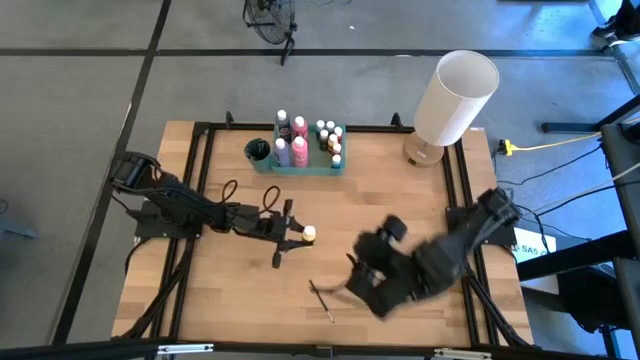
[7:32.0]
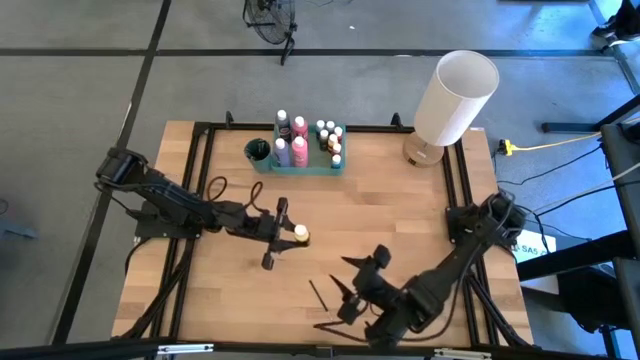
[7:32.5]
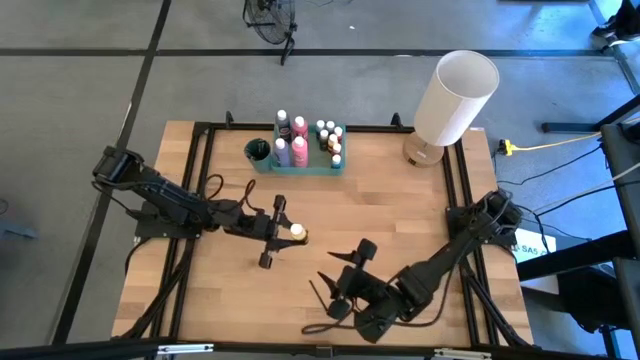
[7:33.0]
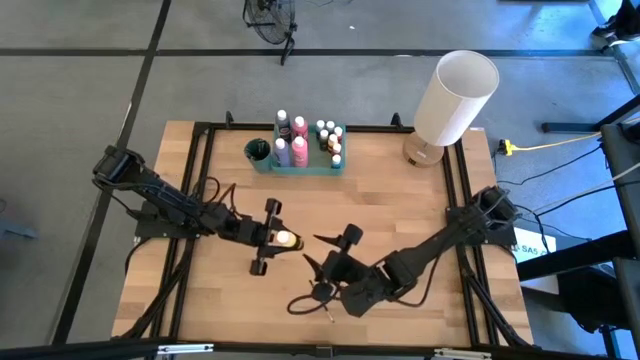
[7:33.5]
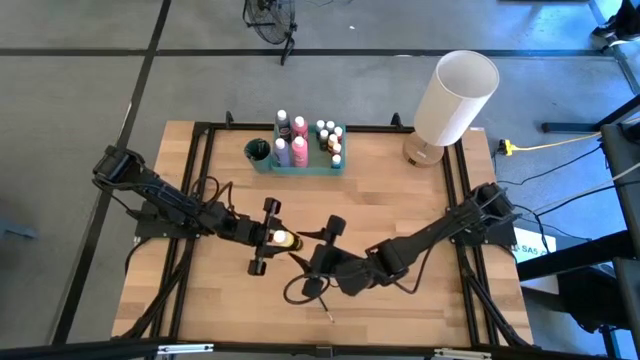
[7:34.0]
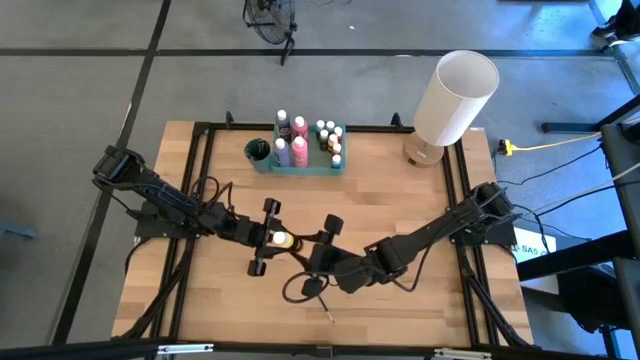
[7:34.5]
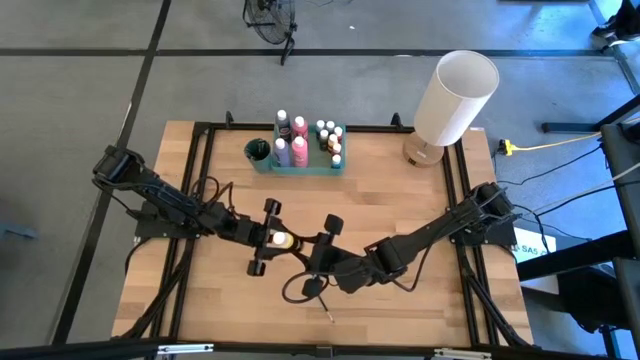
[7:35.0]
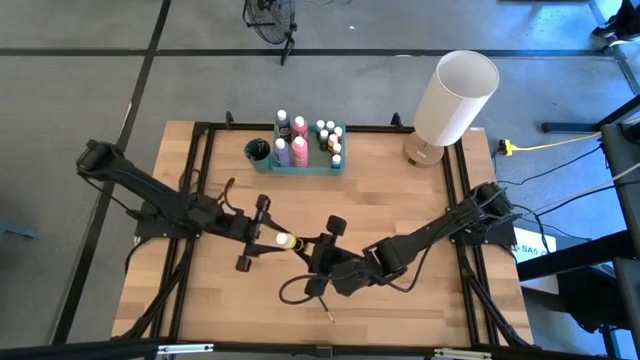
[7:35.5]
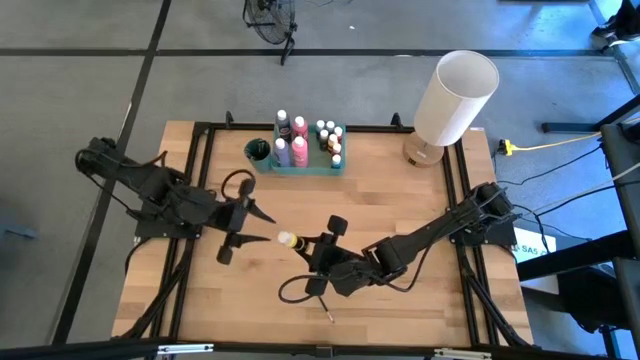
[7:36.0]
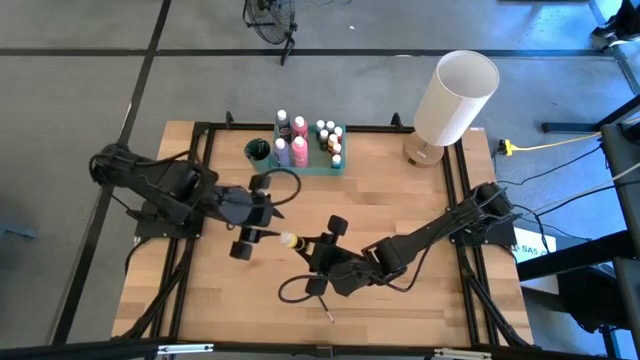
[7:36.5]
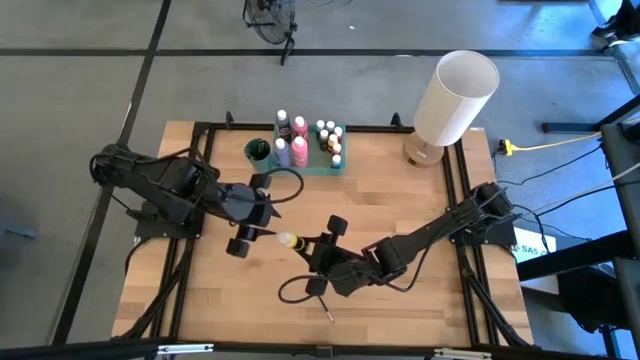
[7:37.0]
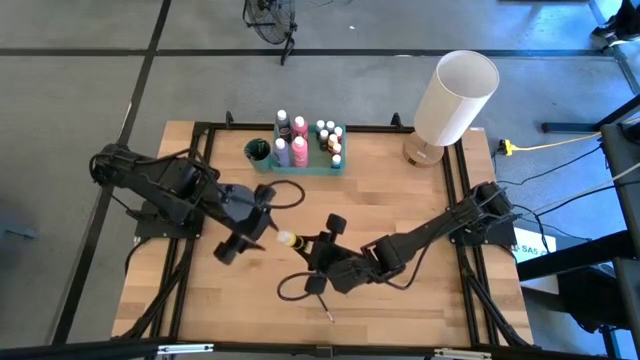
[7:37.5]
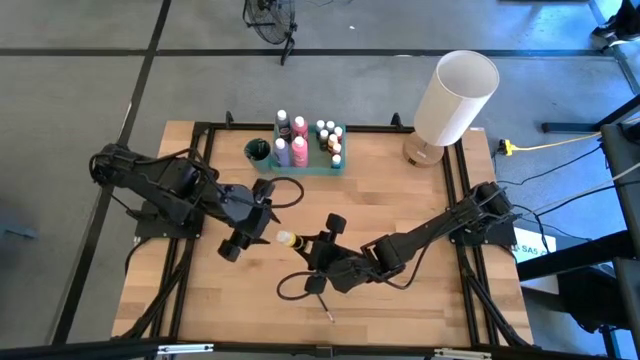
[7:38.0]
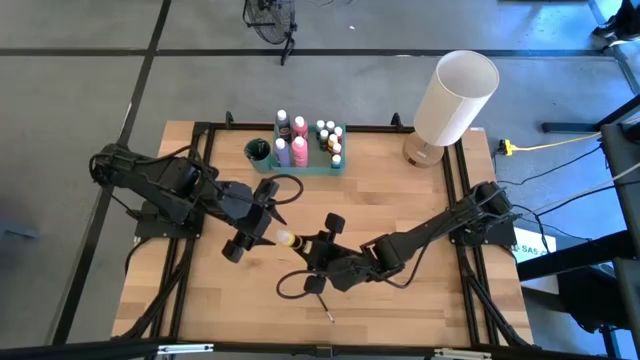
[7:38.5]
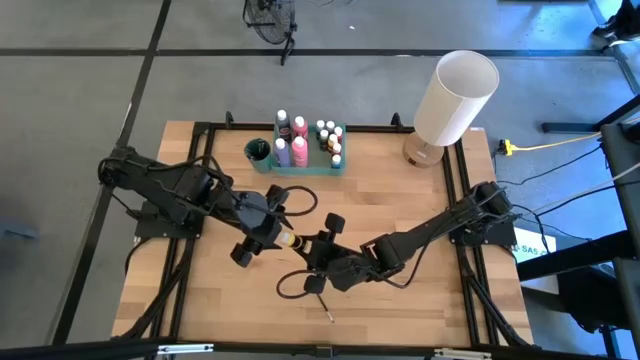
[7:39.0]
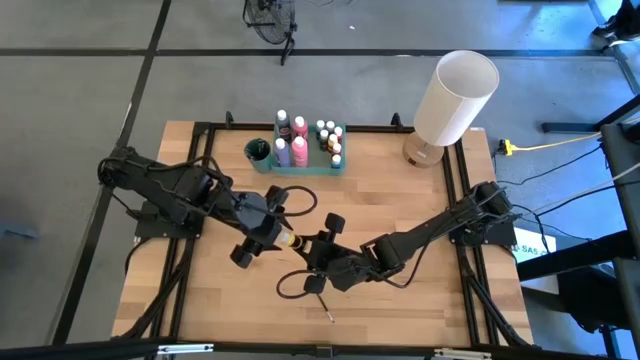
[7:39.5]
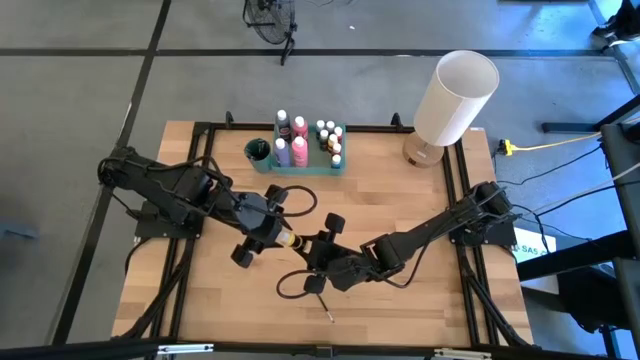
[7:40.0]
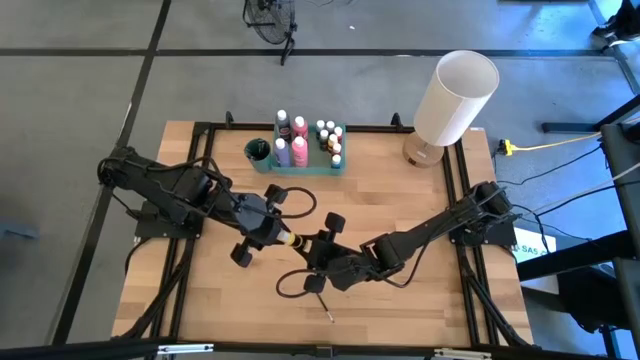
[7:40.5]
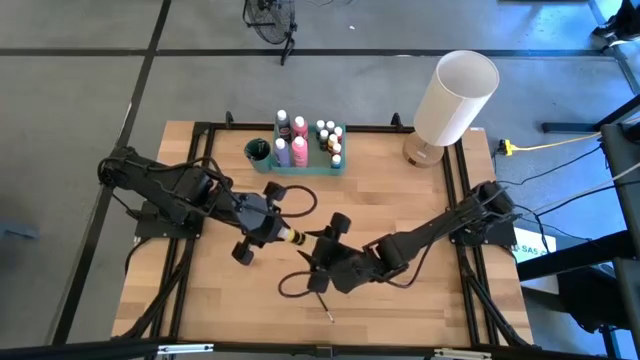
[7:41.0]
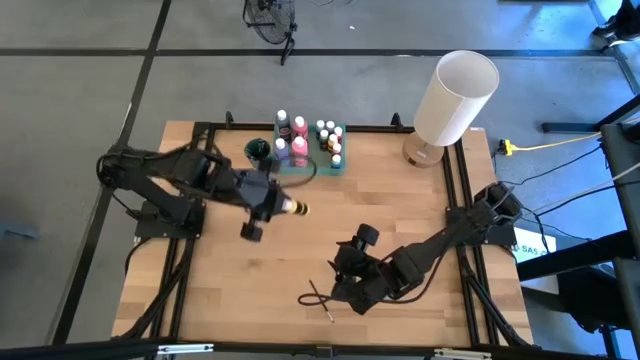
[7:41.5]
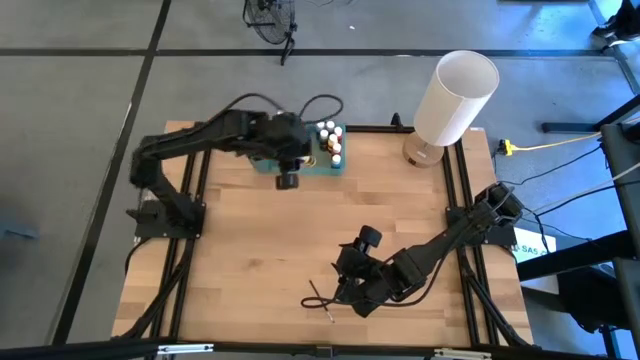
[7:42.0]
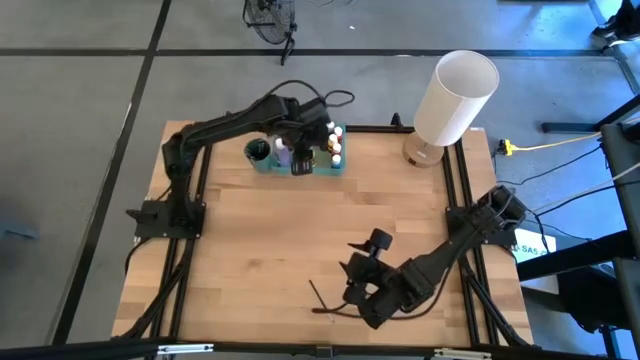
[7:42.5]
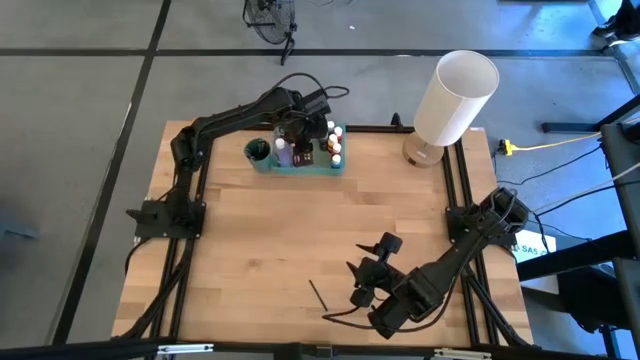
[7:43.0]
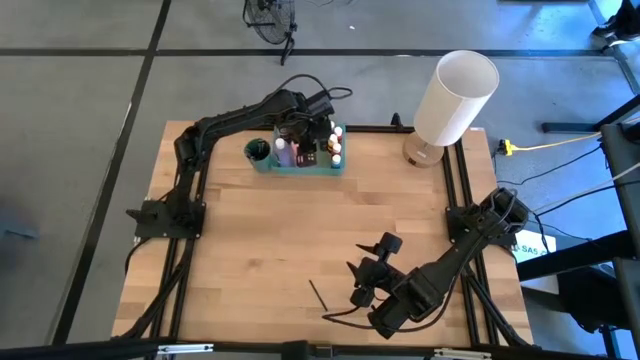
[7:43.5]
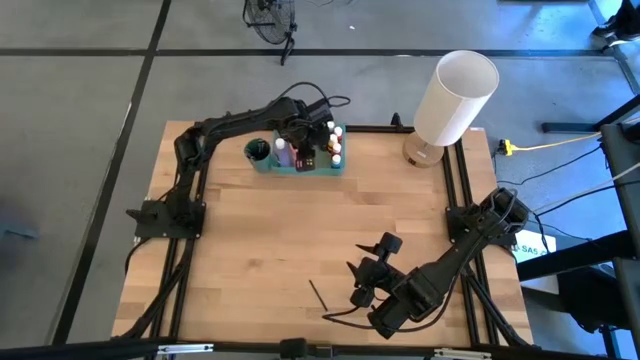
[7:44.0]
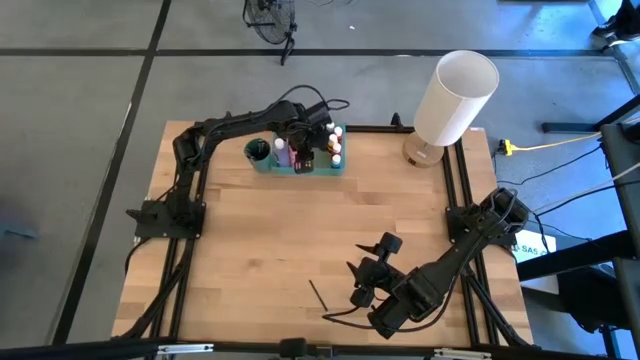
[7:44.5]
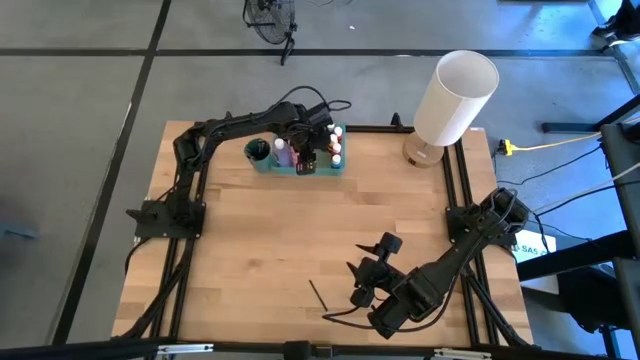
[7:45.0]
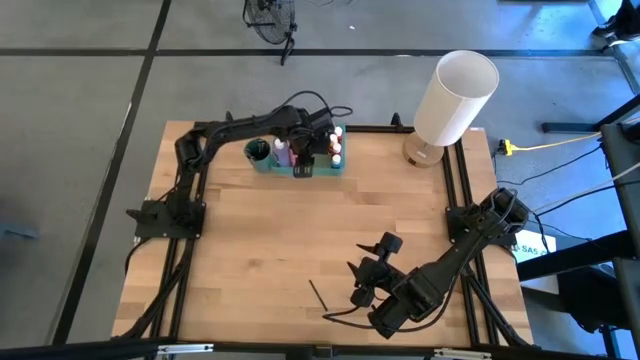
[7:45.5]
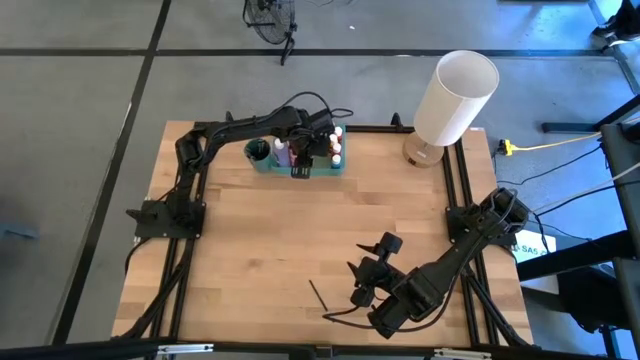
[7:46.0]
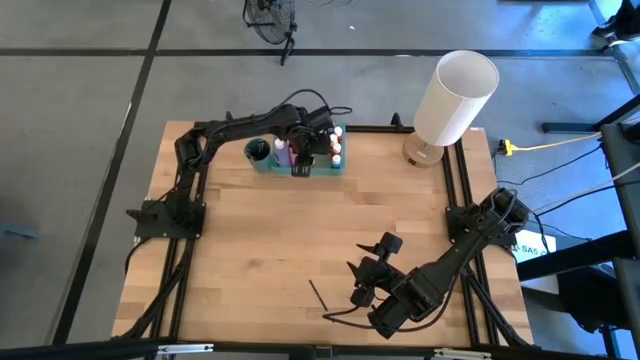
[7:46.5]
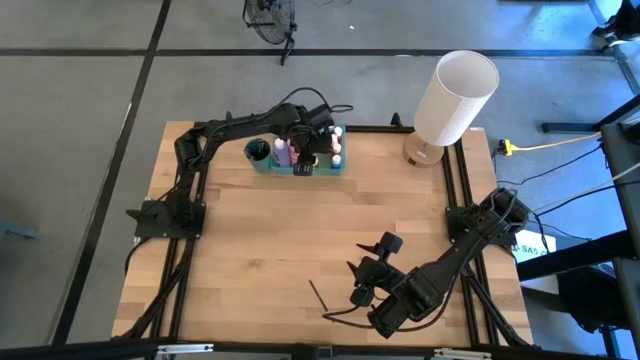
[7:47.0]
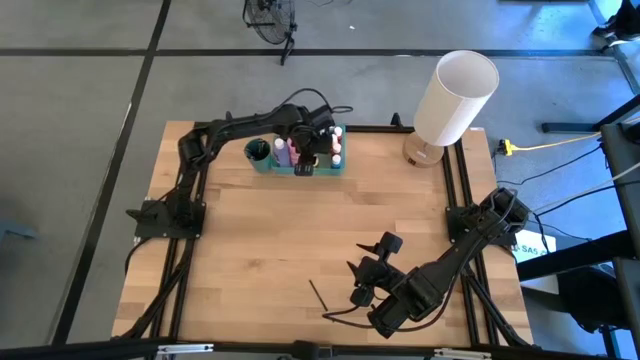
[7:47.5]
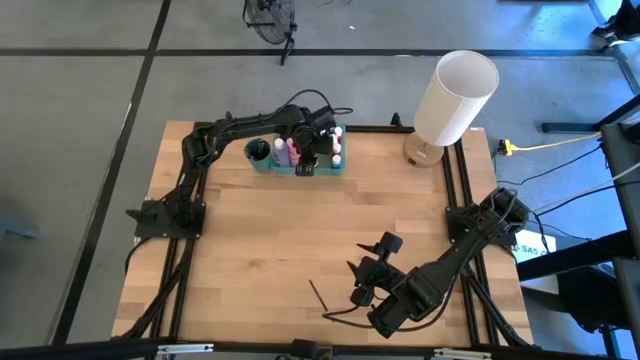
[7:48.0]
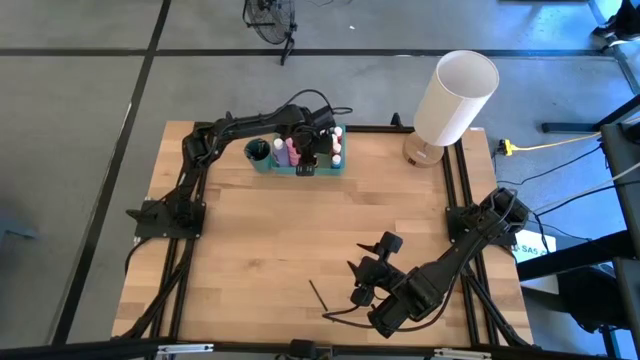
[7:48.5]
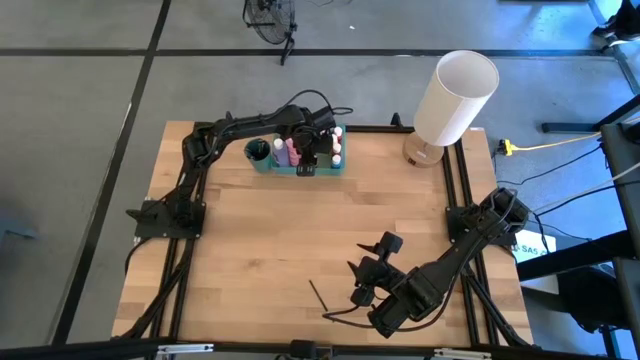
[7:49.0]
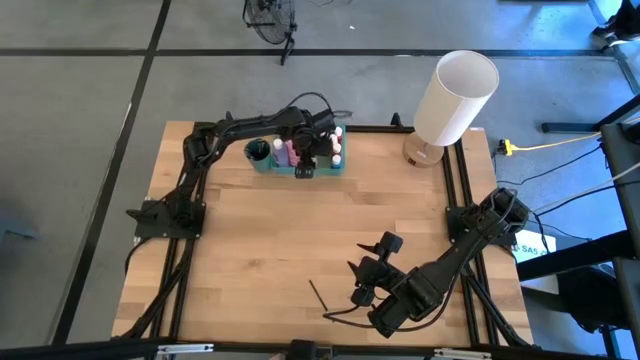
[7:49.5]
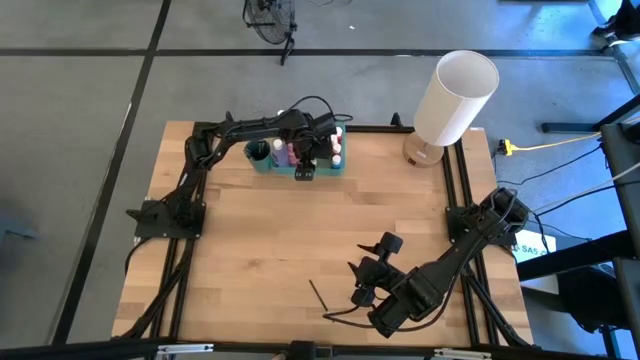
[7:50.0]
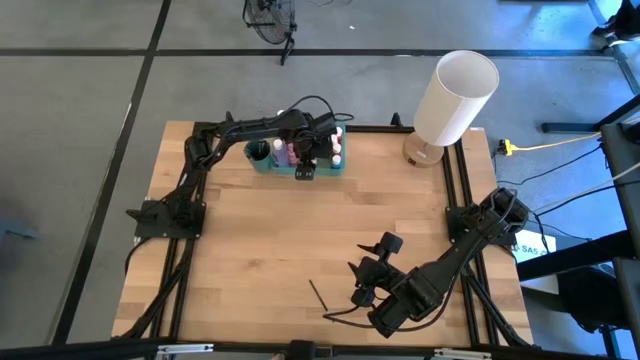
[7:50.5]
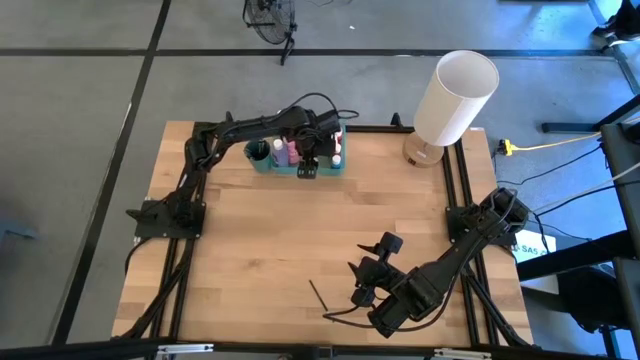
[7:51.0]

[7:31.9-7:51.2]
Task: Pick & Place Paint Supplies
Put the small yellow paint bottle into the green bin

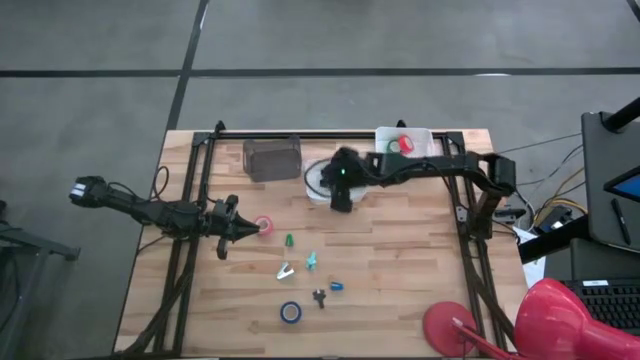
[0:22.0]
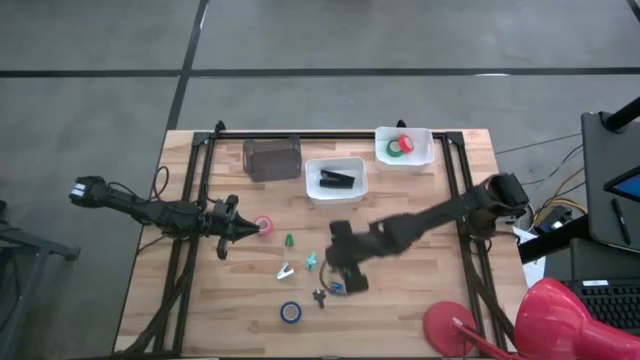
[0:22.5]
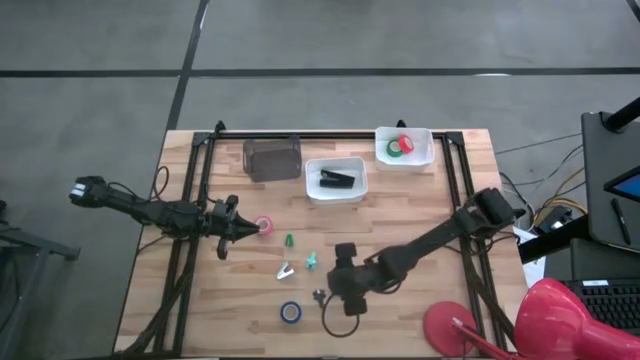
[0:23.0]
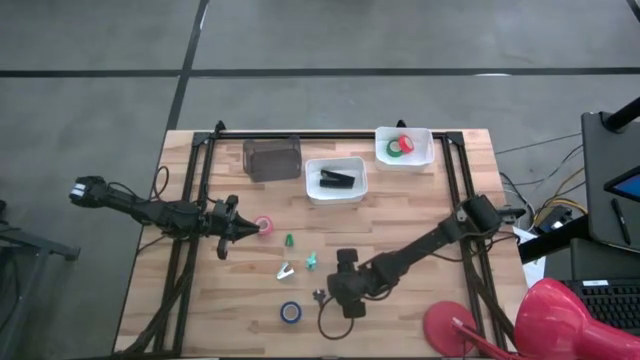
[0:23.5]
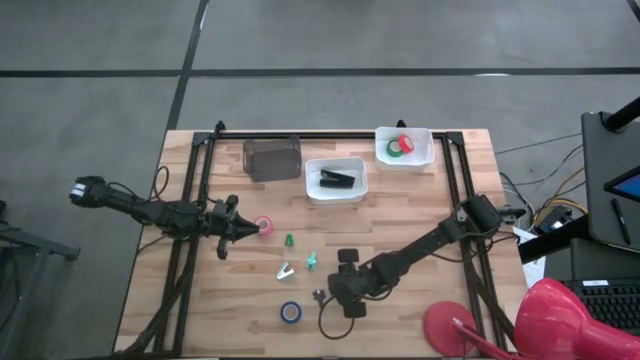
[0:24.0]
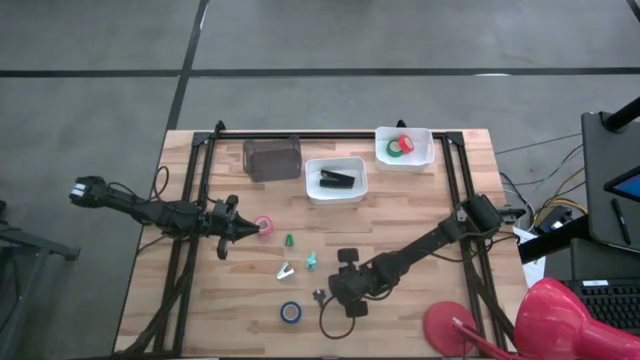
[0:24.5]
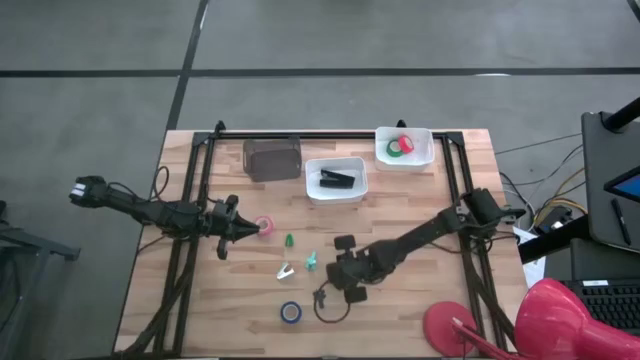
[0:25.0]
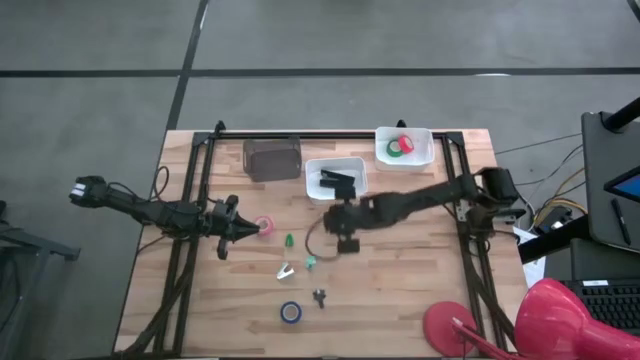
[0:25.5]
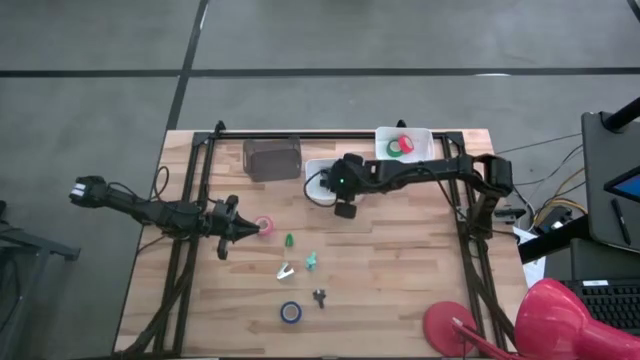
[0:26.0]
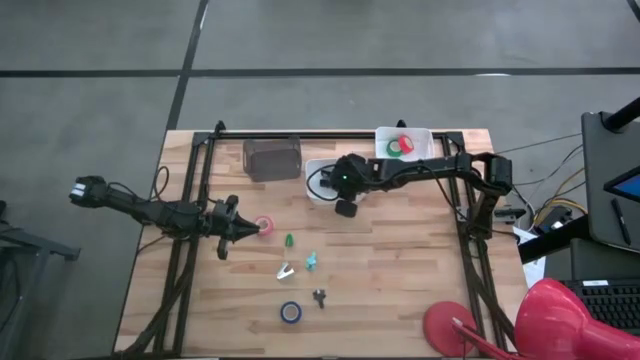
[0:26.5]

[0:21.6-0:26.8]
Task: Pick and place Stapler, Stapler remover, tape
Put the blue stapler into the left white bin
